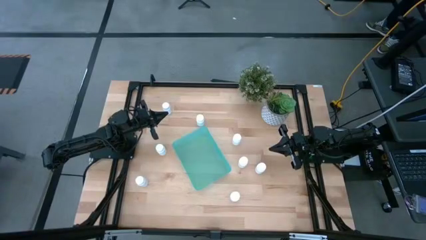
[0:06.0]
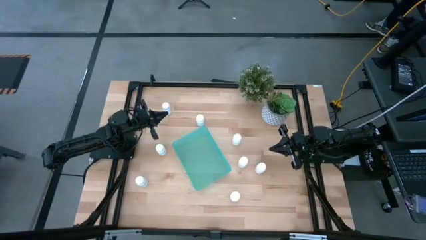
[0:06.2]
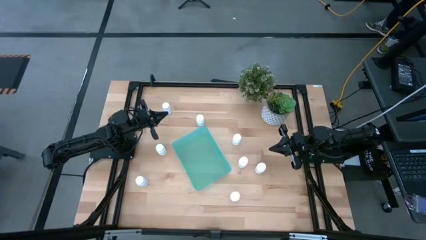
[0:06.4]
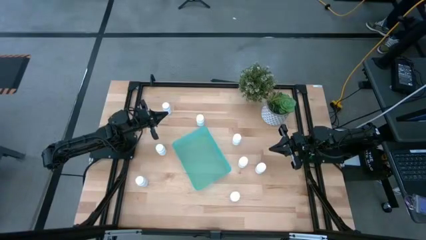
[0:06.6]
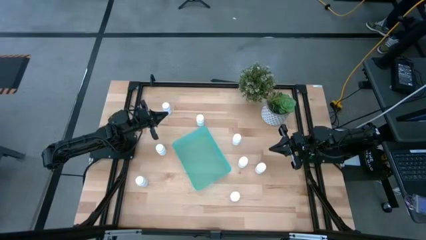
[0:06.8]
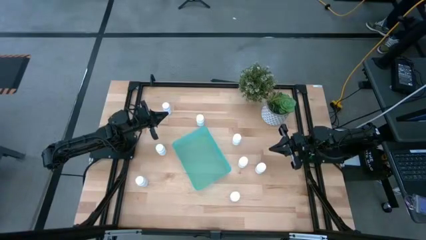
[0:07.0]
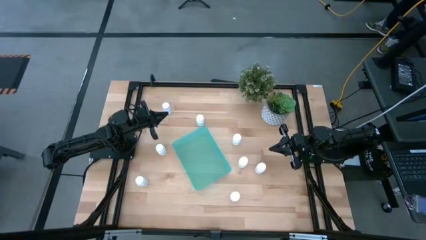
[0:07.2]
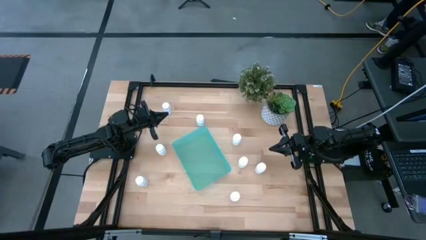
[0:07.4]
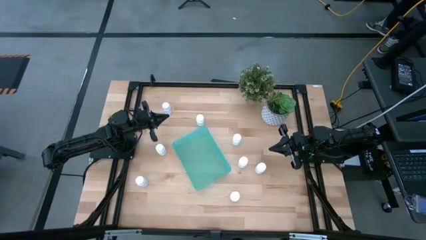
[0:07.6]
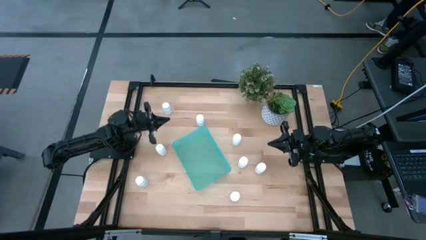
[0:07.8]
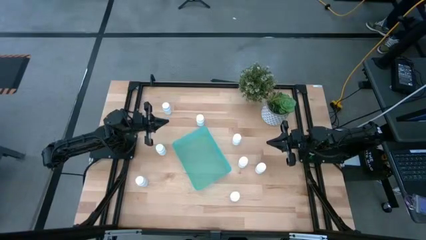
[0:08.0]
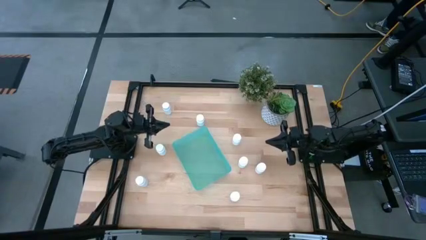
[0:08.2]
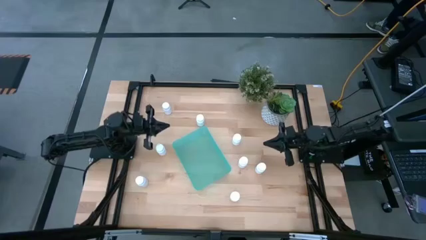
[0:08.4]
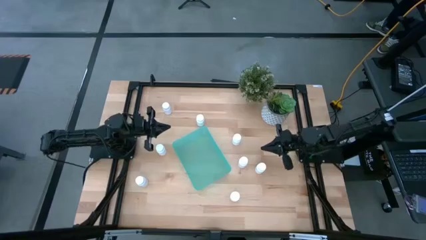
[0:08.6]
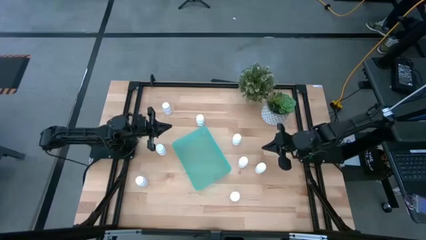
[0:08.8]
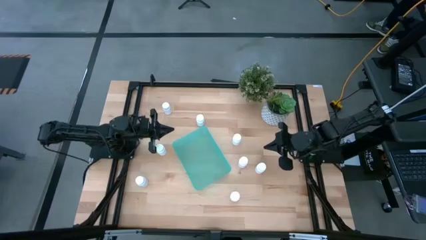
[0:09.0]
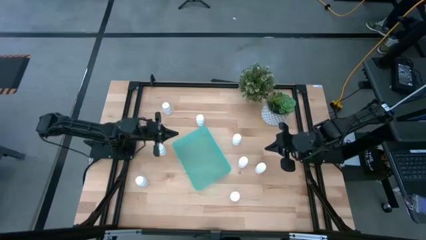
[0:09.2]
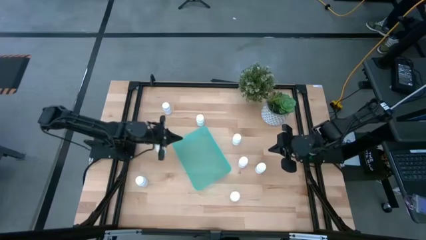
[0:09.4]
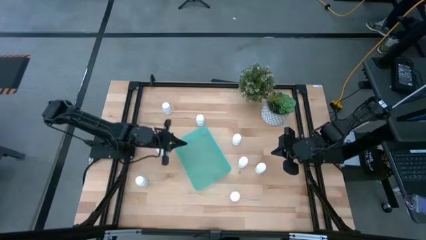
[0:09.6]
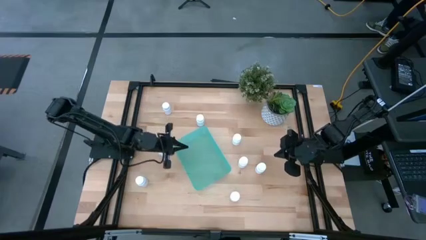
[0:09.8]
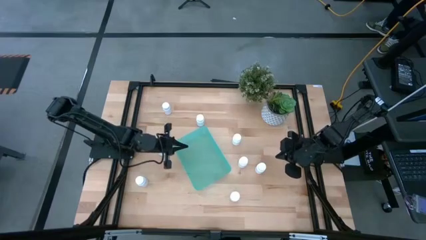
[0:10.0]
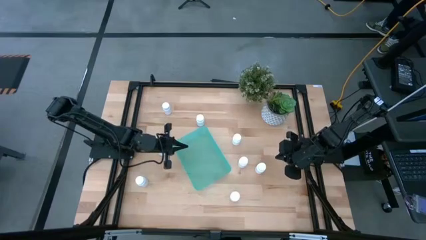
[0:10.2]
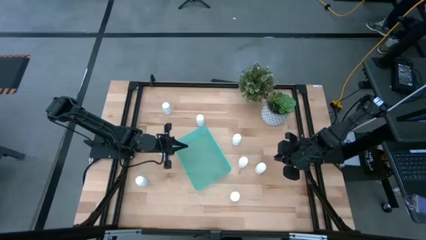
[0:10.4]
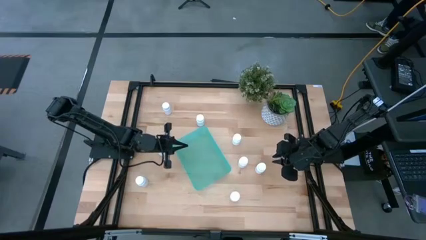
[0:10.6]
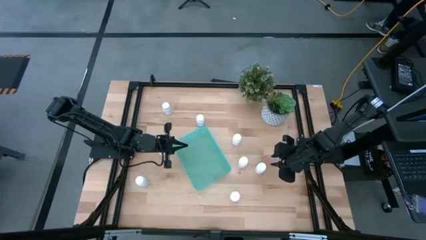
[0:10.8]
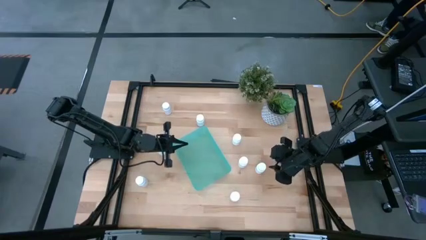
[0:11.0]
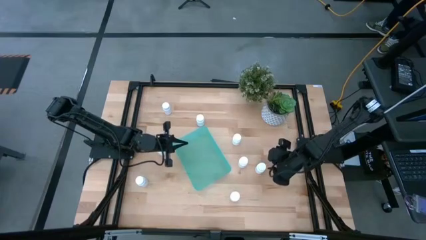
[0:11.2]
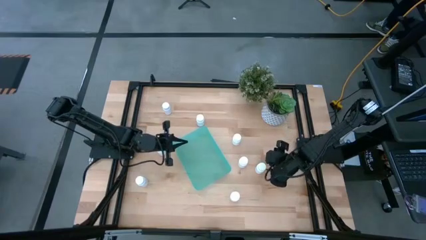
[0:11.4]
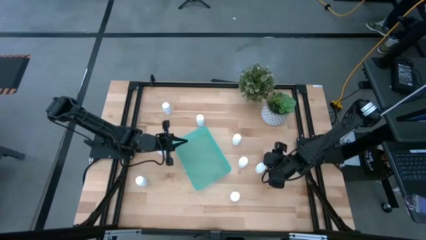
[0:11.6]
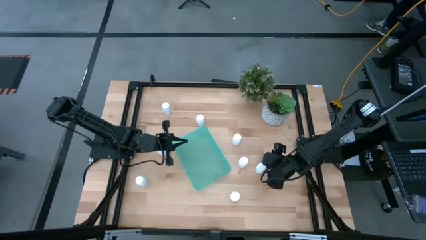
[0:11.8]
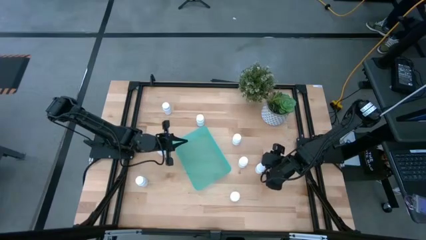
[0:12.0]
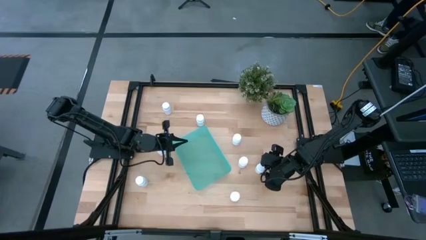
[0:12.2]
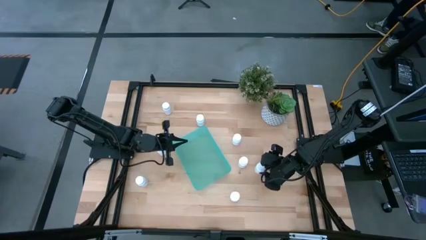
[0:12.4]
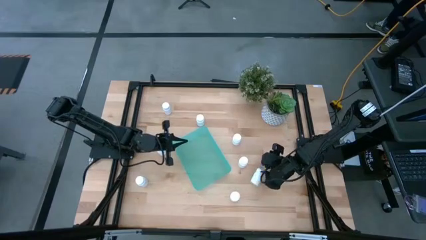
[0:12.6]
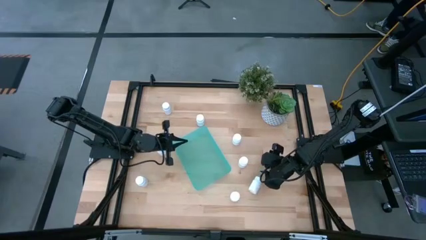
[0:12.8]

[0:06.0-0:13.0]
Task: Pick and place pill bottles into a basket
Put the white medicine bottle into the green bin

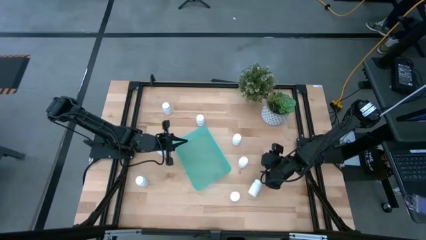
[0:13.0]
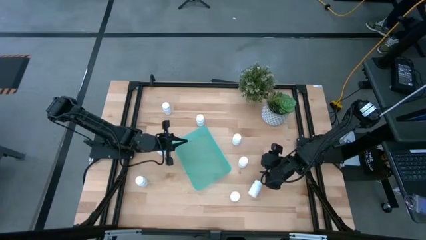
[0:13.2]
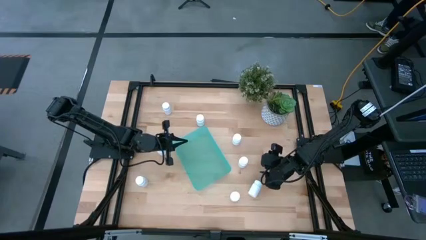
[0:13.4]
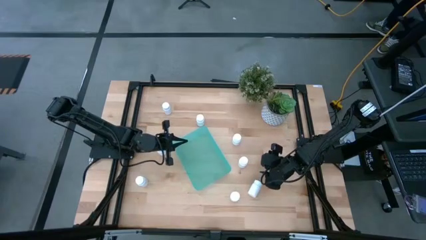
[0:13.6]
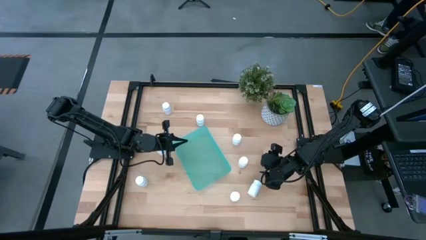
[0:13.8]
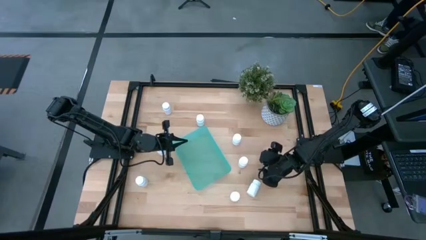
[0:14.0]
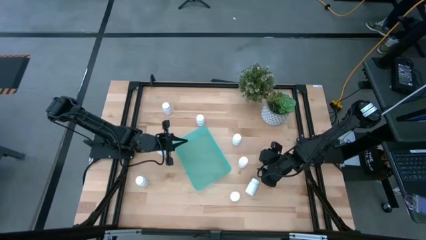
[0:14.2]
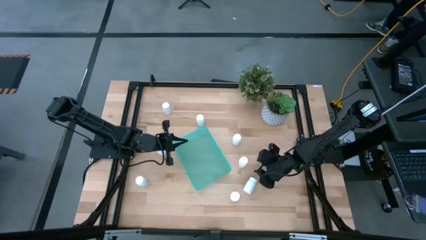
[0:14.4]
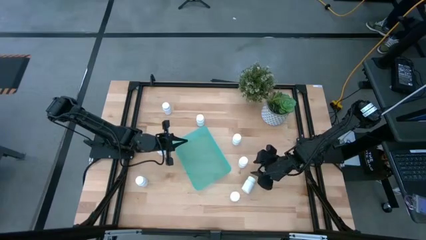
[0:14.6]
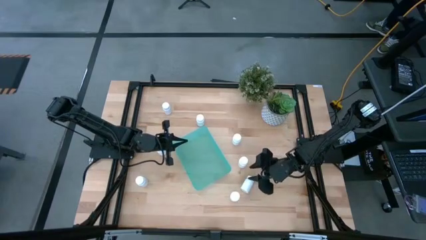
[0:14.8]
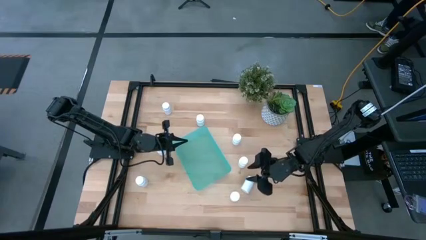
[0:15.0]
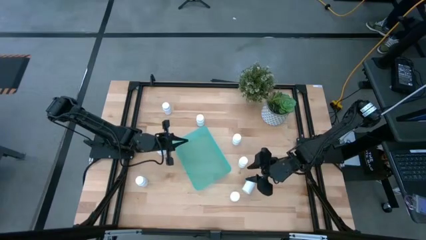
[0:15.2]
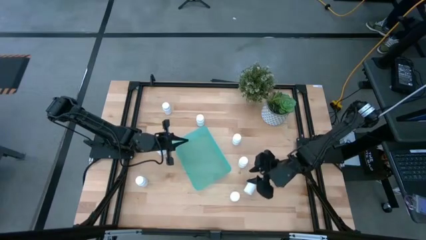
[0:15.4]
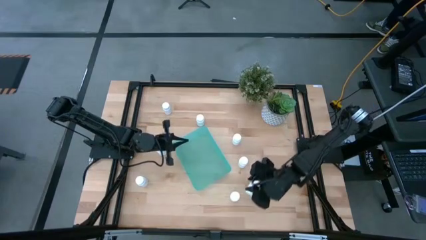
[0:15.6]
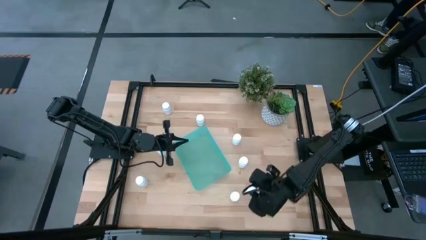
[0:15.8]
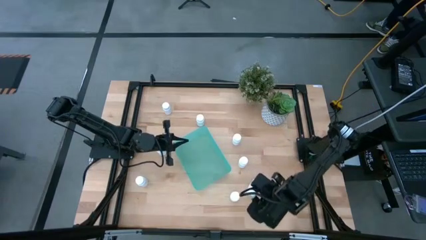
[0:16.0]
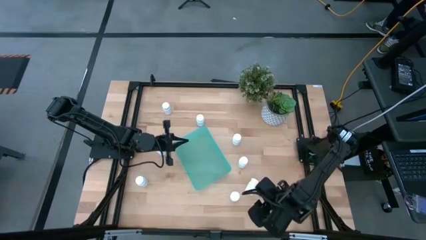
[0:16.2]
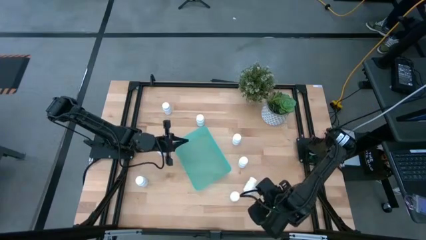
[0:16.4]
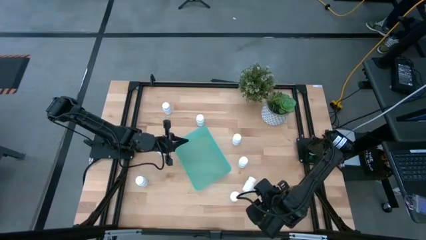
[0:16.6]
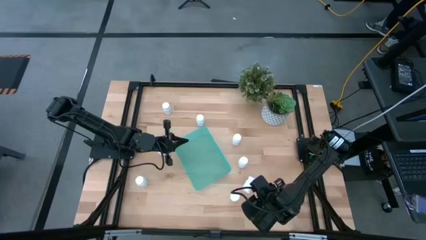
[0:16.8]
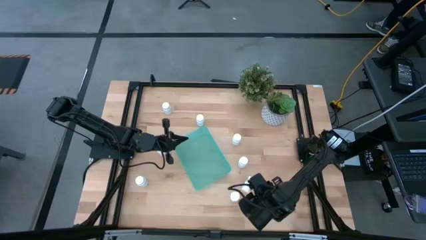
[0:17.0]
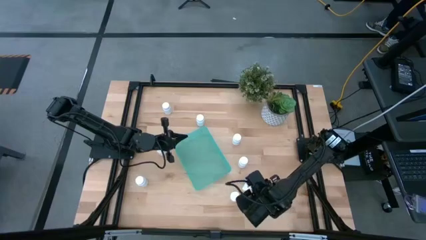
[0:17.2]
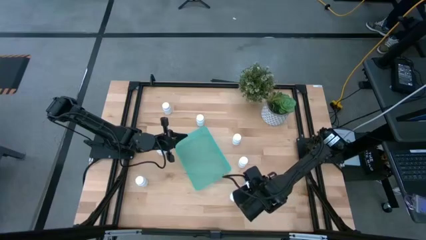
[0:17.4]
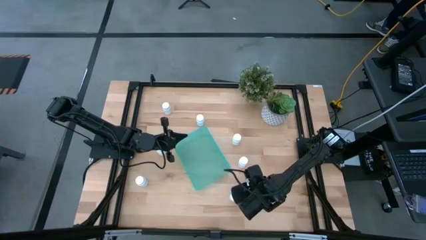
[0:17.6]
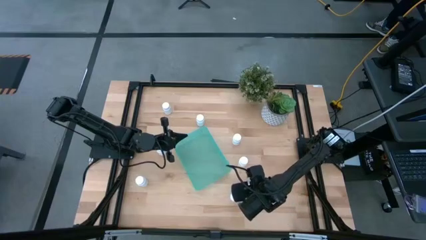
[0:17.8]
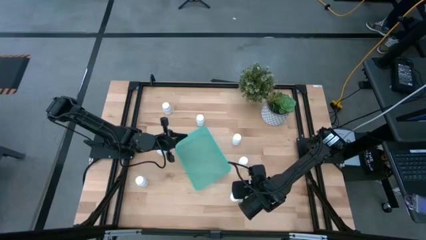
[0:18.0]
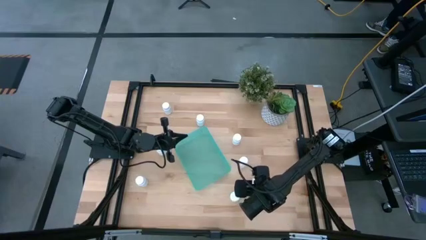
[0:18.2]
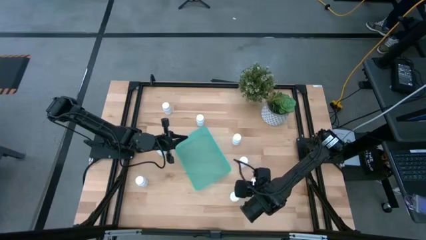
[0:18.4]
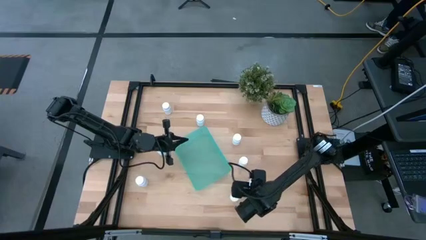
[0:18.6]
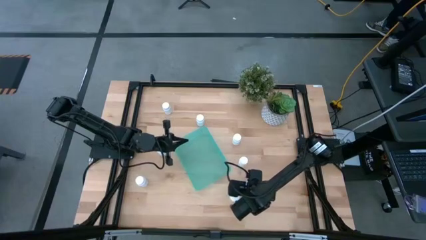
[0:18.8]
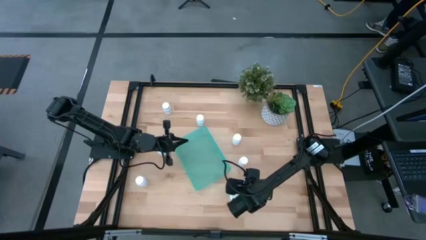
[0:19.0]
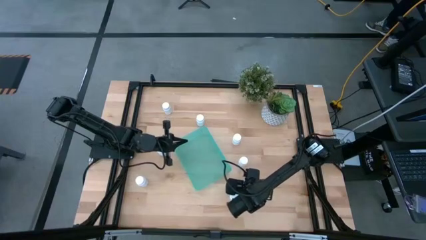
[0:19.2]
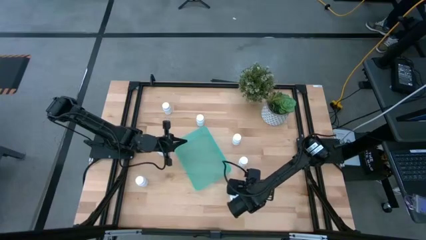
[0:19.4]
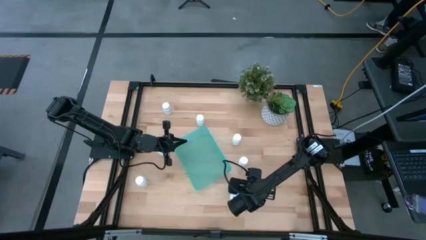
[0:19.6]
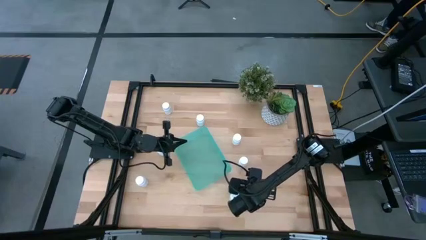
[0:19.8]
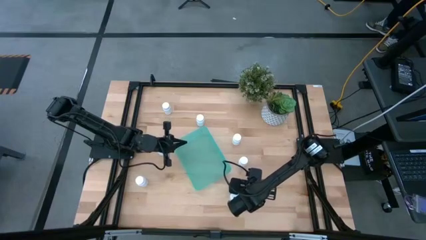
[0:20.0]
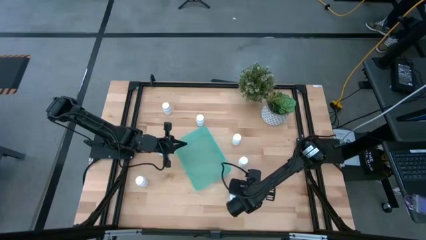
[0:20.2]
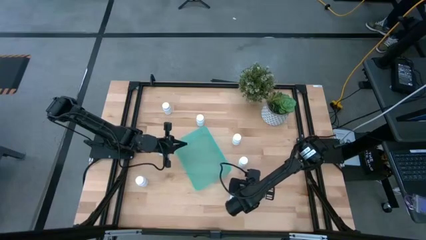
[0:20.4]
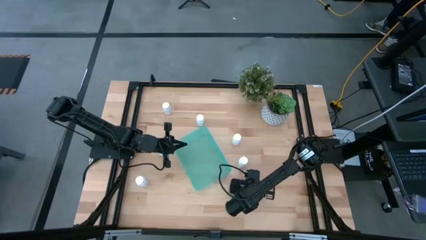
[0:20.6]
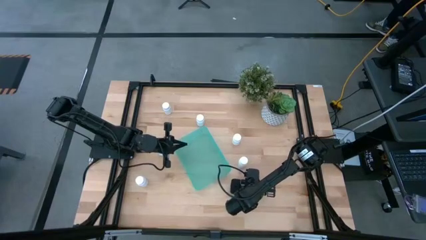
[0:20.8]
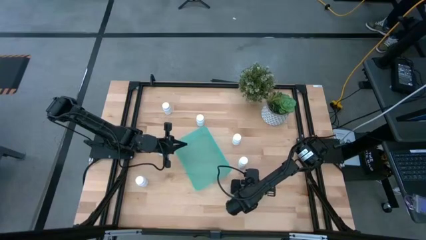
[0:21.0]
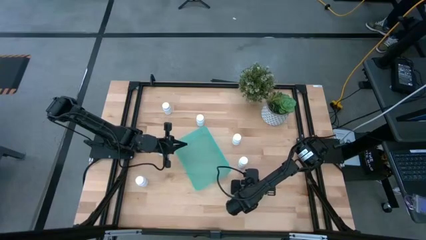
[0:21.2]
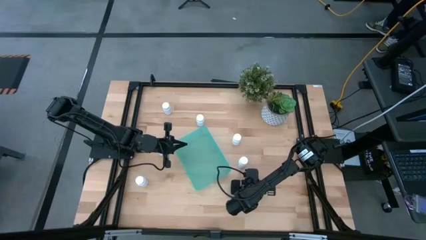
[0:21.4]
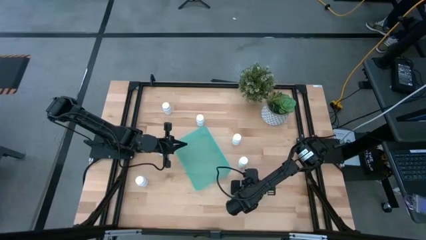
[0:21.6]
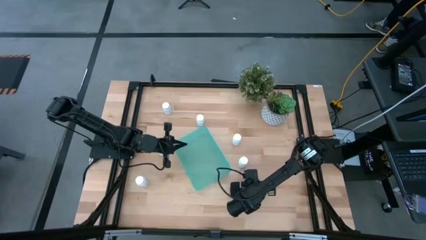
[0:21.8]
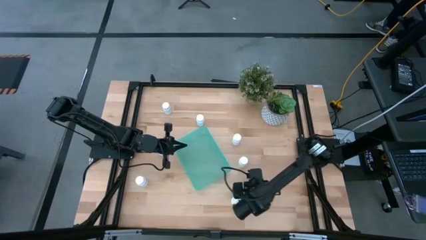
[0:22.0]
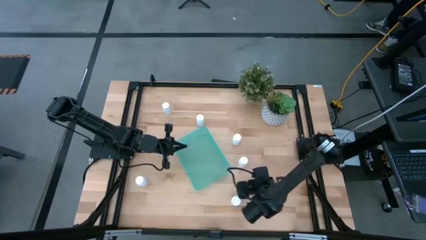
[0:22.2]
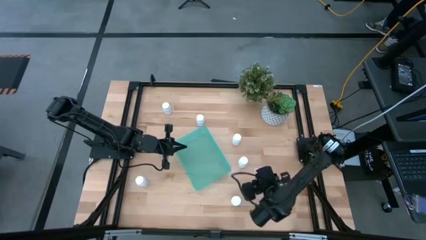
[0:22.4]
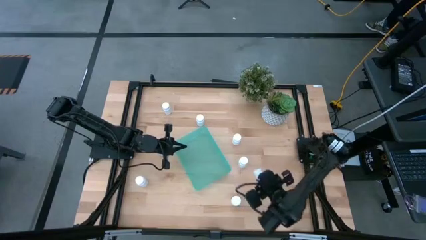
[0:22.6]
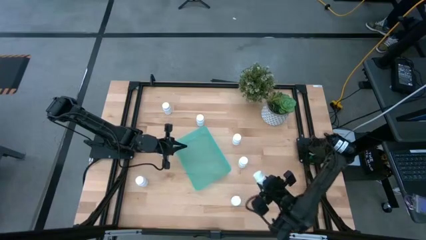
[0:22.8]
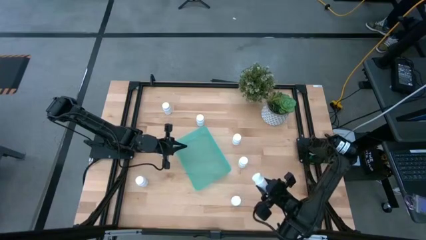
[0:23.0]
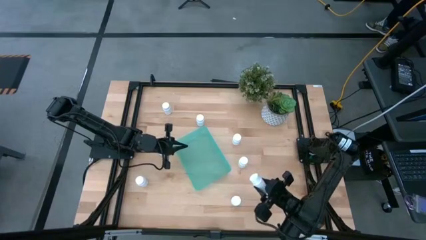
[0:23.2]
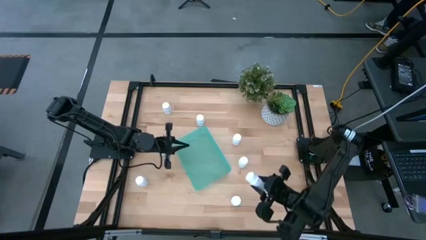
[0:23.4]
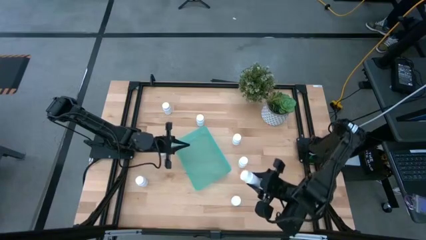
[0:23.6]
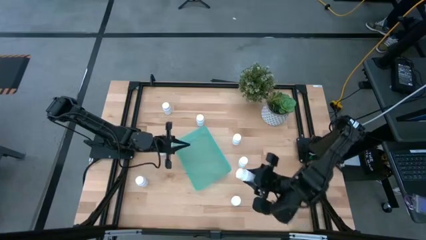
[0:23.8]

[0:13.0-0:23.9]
Put the white medicine bottle into the green bin
